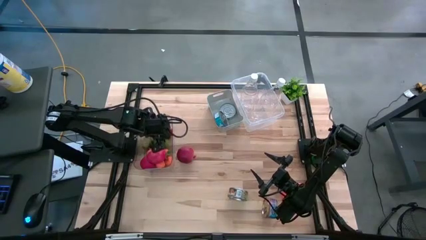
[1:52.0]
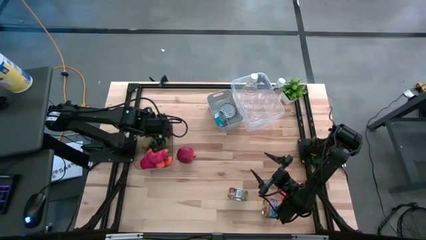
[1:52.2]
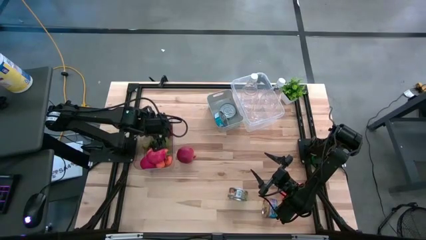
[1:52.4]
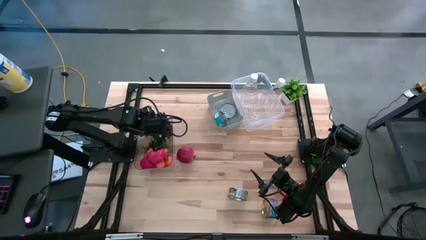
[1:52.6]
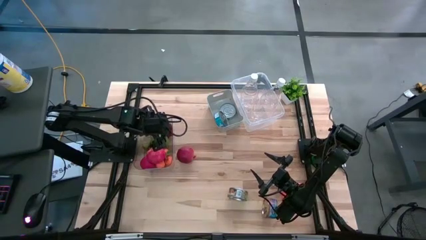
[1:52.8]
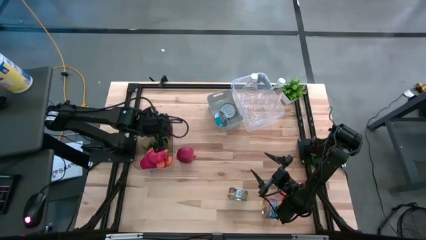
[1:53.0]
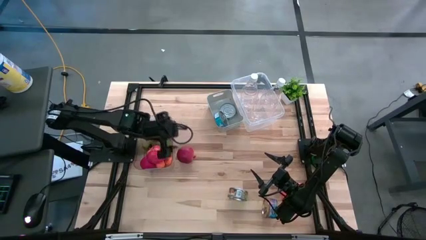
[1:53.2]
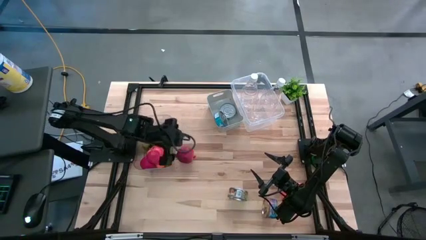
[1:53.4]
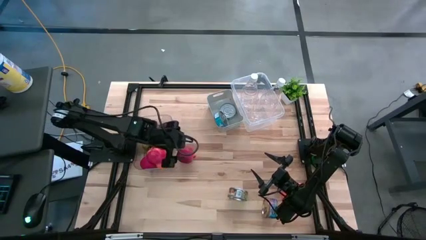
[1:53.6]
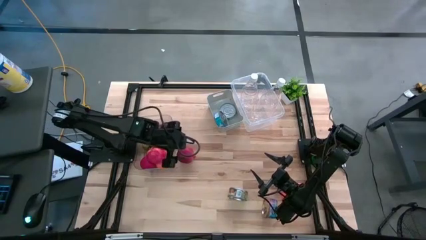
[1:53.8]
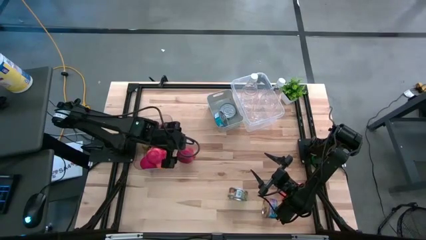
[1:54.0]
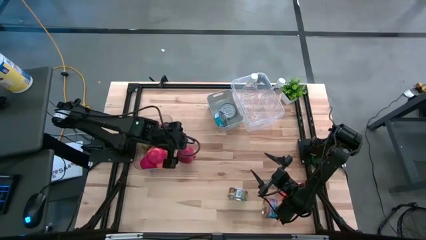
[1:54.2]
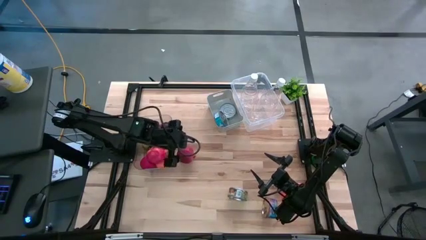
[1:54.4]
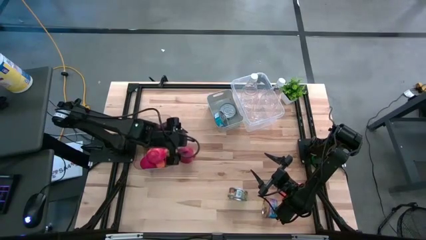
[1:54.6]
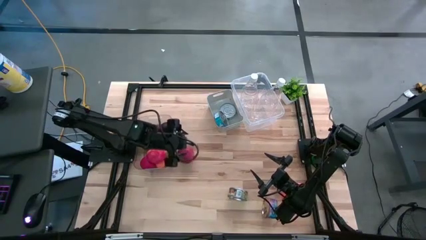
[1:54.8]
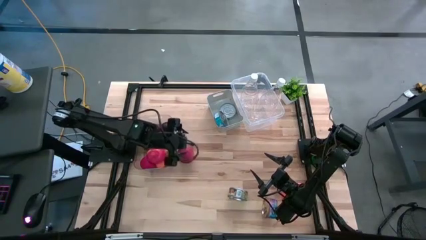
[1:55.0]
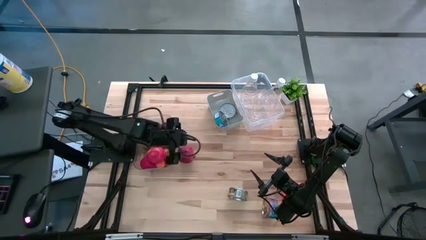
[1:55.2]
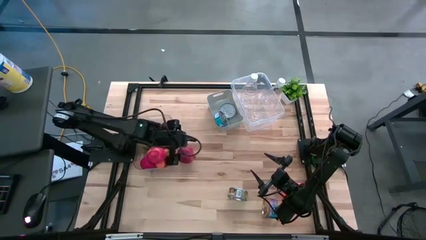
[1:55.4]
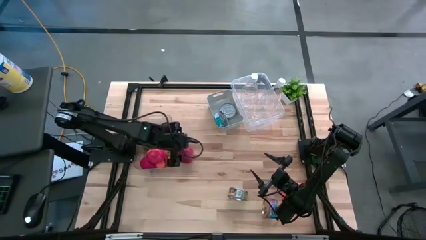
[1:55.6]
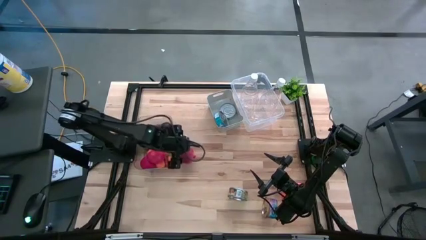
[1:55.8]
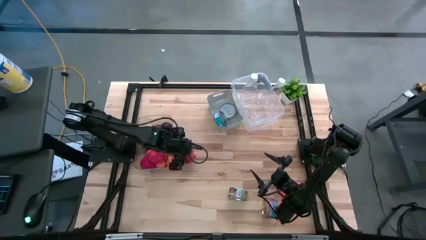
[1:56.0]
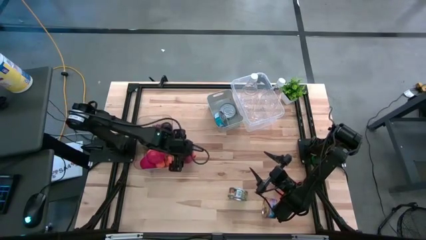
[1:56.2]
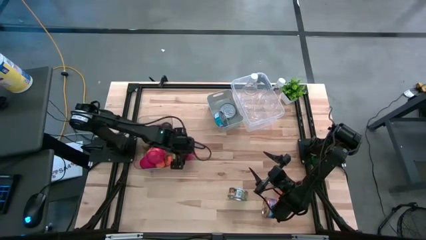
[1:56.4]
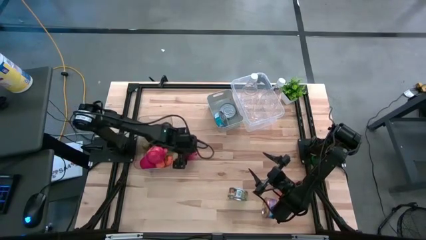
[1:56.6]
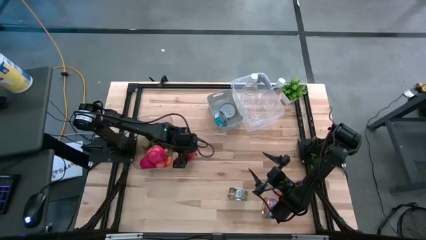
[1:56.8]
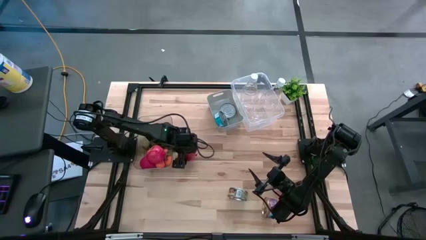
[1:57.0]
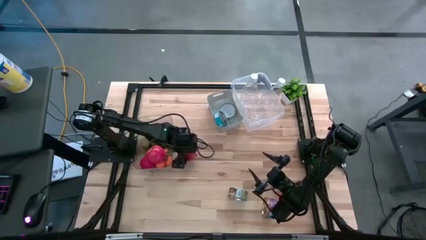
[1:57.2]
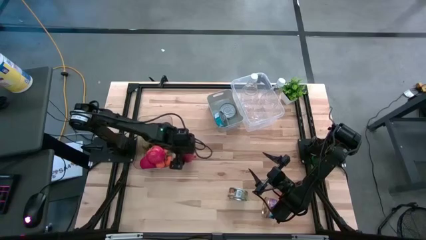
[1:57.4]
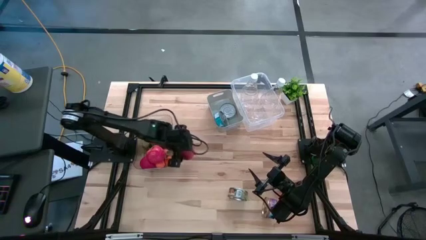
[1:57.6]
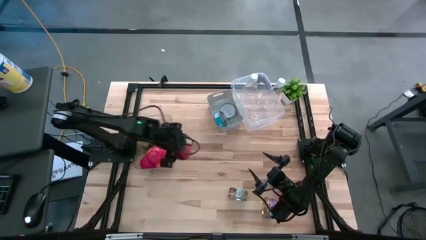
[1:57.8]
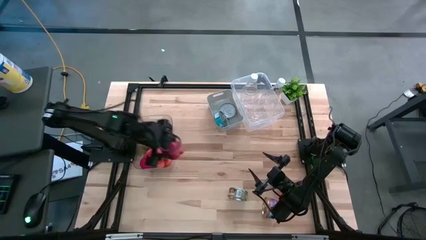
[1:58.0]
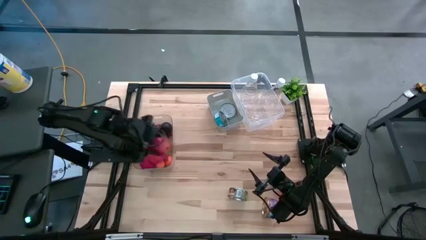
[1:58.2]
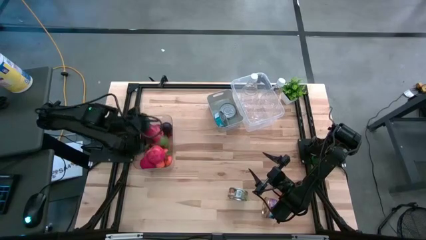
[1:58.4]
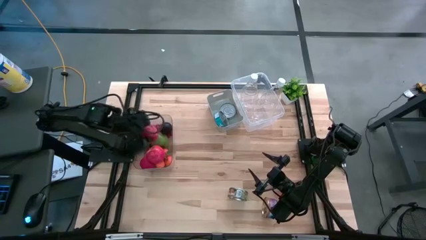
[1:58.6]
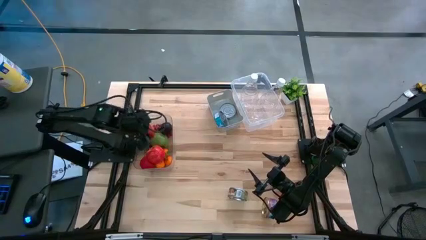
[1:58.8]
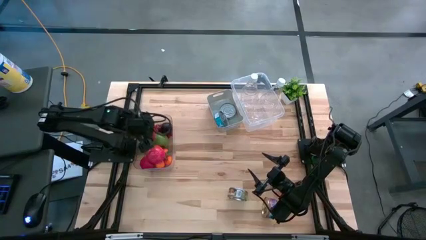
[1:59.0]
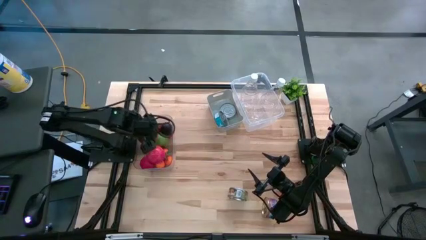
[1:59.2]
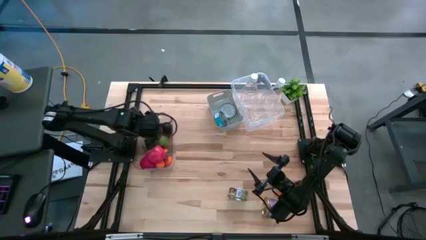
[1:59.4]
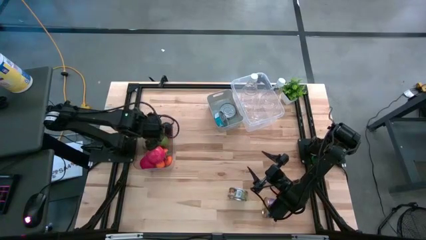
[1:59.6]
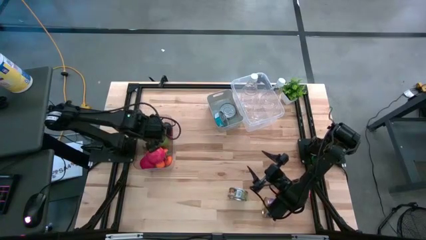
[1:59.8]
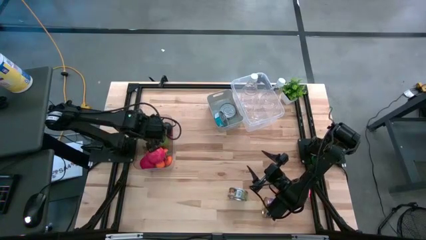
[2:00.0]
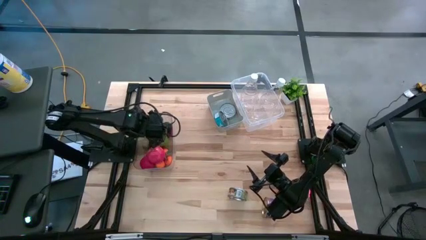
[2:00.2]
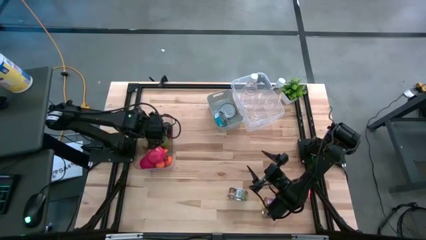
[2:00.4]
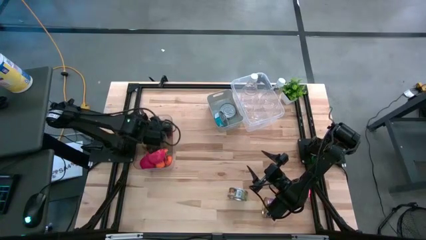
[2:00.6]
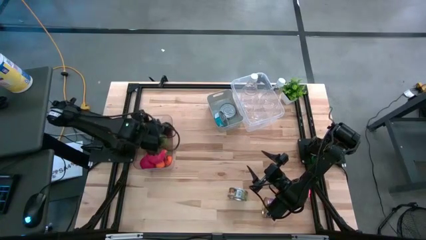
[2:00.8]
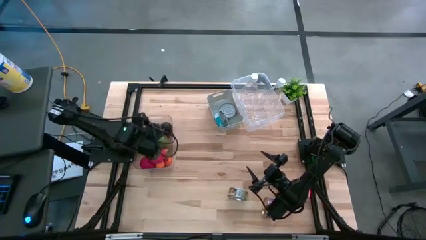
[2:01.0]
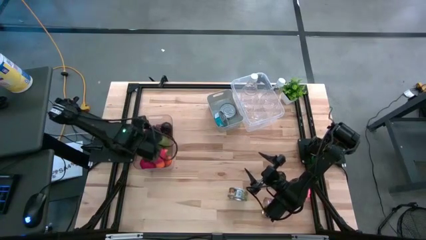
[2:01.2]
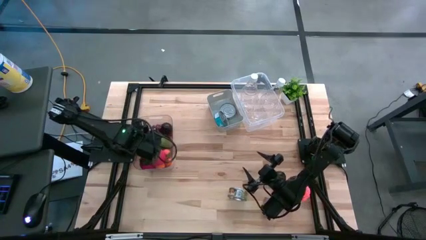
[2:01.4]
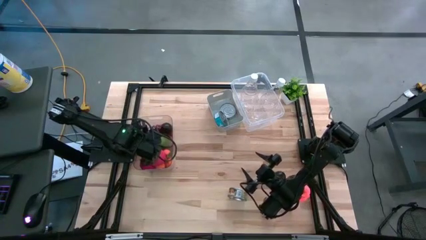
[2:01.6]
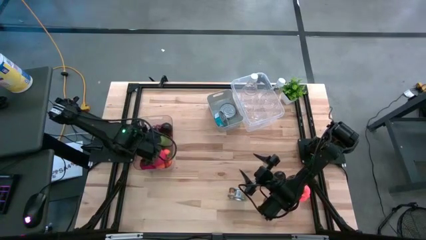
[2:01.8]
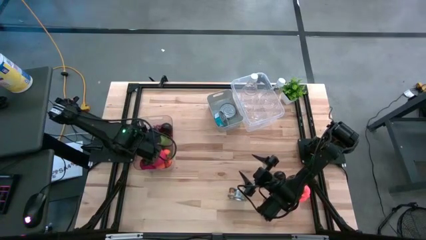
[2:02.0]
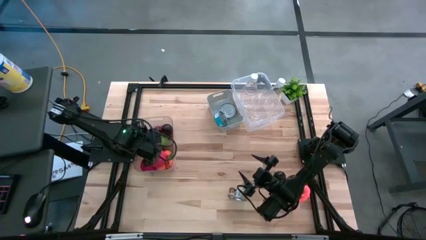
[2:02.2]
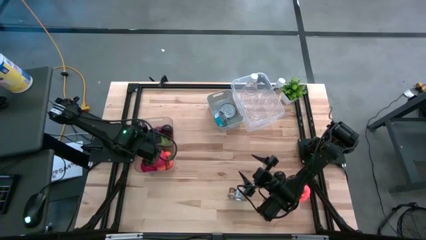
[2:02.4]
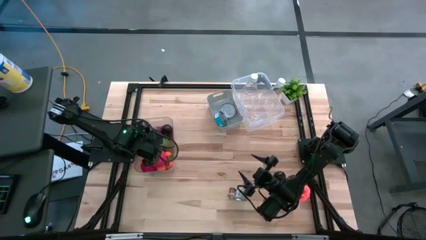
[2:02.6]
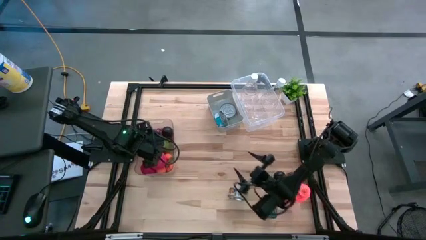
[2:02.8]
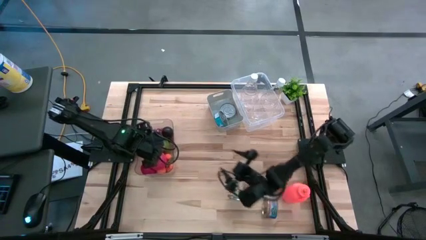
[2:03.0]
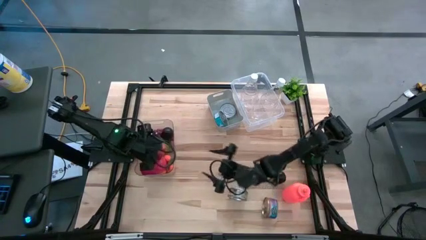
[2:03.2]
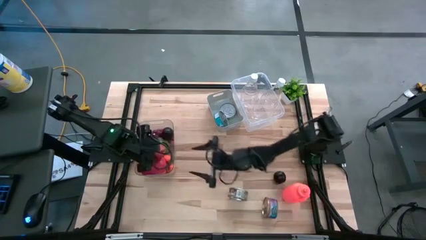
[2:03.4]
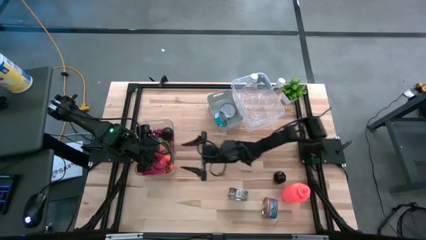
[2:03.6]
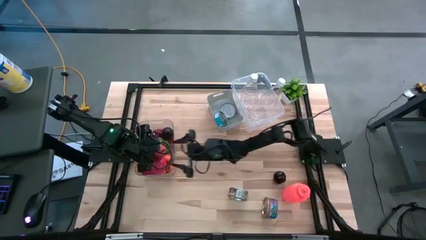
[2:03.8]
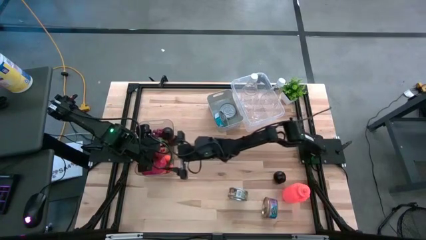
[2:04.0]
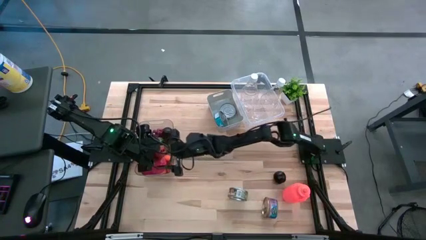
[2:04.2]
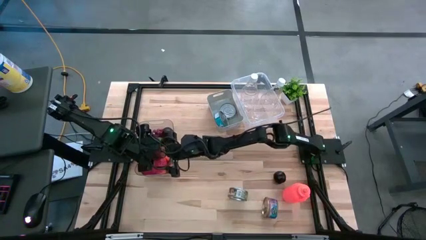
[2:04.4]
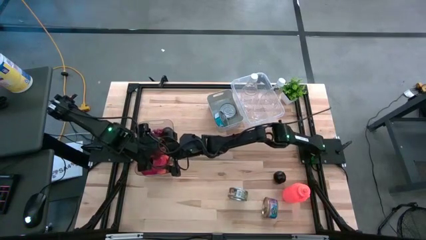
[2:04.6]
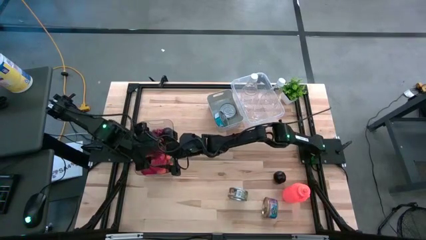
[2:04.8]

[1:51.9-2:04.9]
Task: Pick & Place Food Item
Put the red pomegranate into the left transparent bin

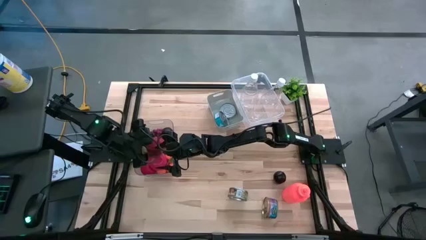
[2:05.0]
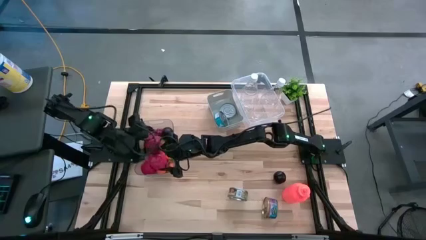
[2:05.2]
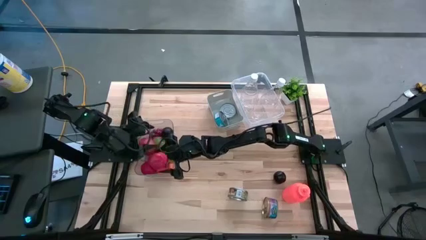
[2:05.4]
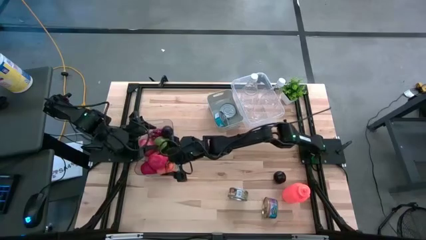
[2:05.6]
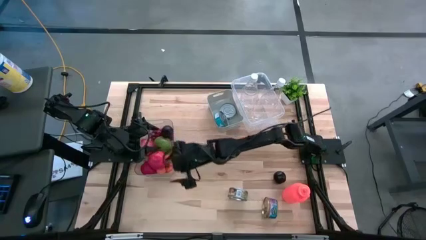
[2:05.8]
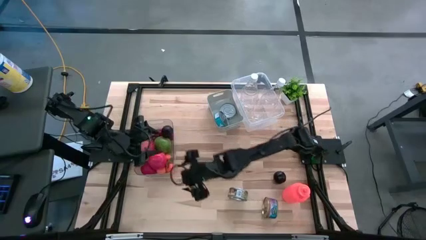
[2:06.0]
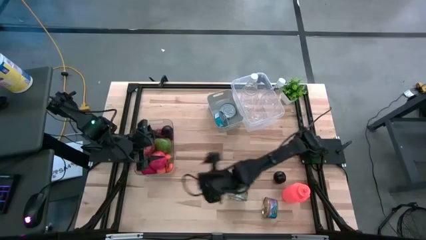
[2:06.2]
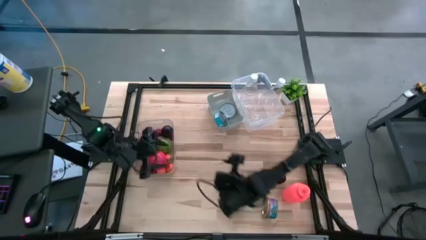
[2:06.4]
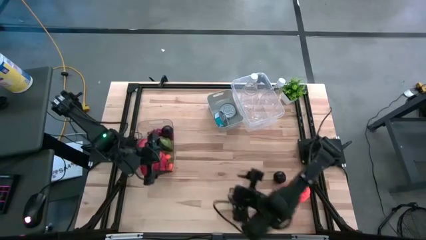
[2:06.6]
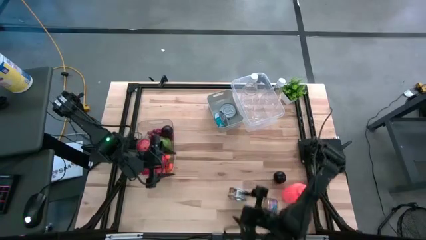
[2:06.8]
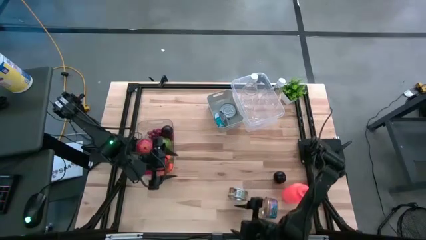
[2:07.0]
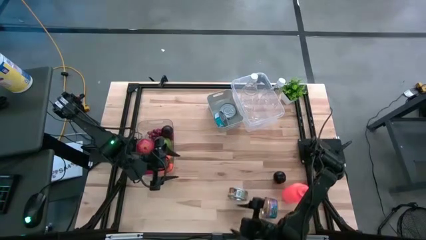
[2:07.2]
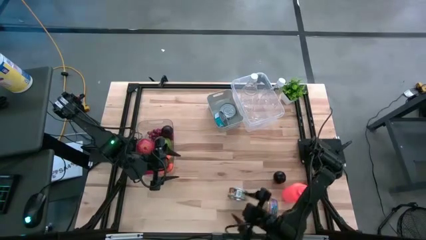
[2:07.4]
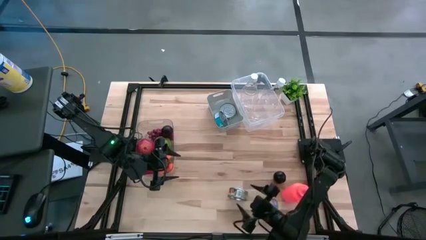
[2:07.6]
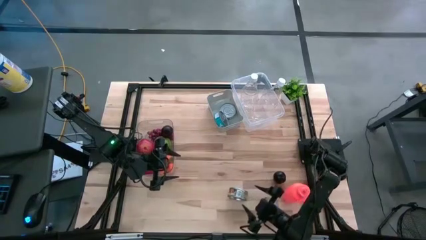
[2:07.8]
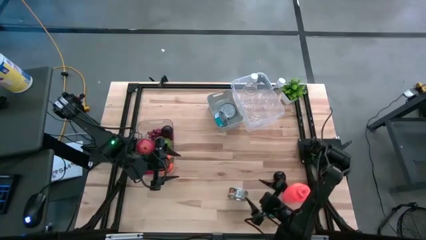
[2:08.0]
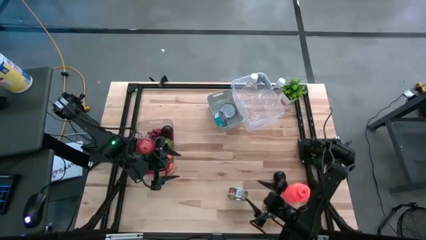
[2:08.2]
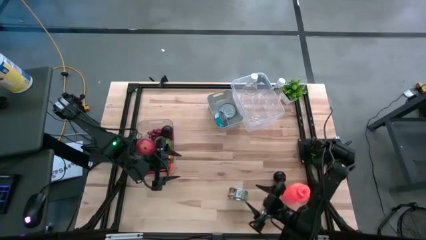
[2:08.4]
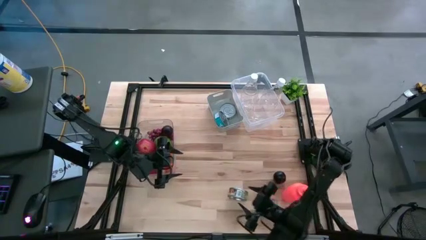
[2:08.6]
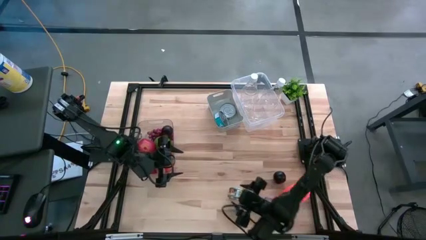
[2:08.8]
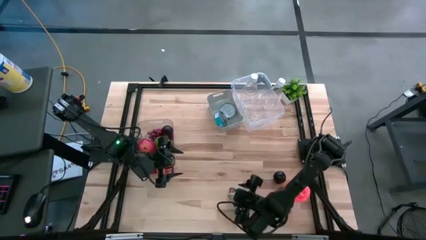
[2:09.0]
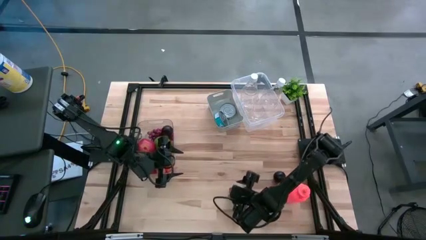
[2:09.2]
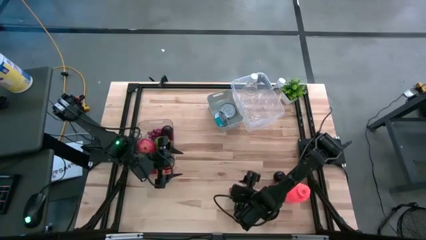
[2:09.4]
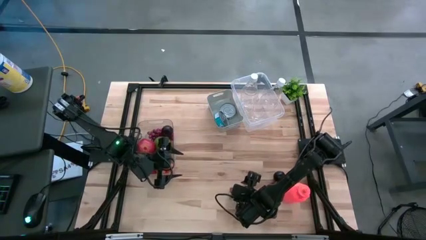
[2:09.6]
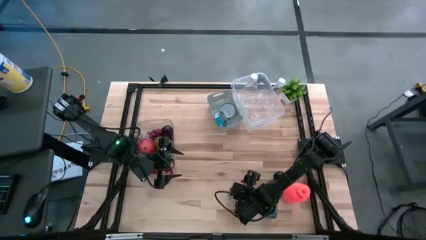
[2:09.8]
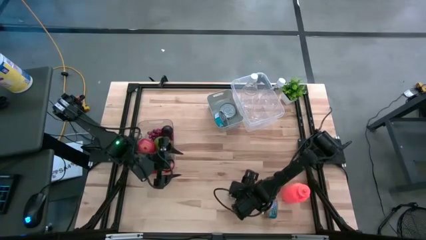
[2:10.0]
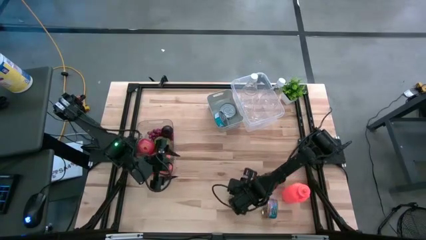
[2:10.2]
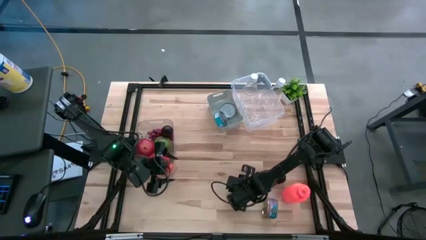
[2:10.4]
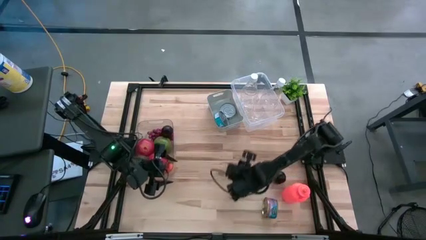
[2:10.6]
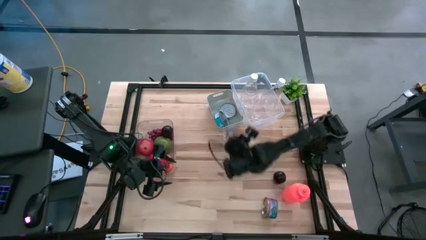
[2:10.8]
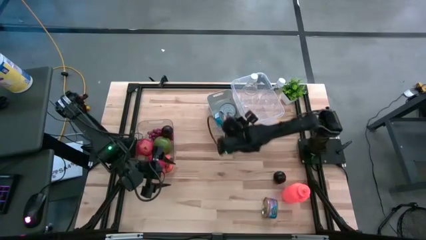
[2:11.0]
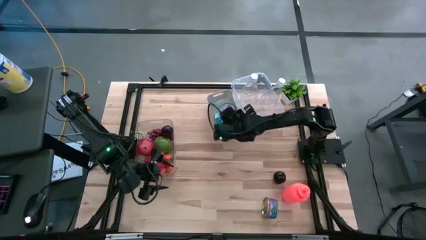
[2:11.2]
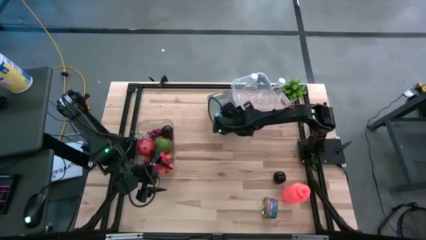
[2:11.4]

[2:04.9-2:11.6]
Put the green tuna can into the white bin
